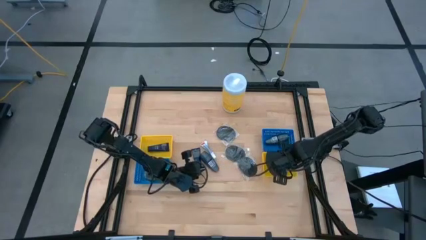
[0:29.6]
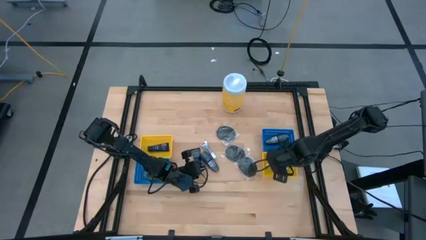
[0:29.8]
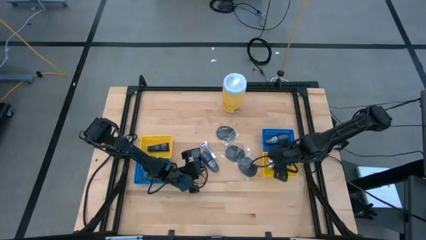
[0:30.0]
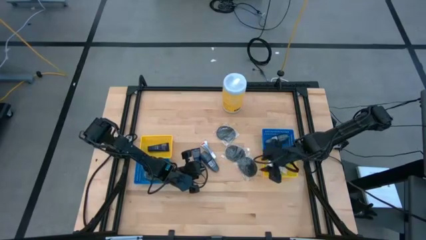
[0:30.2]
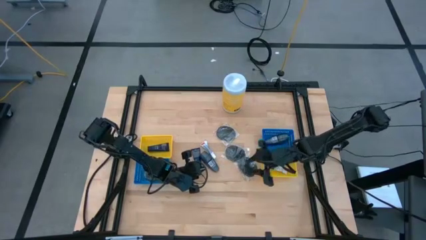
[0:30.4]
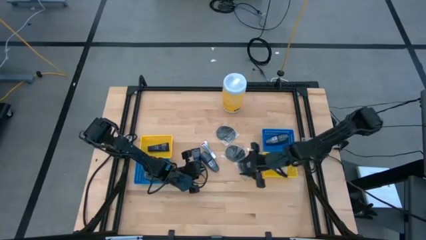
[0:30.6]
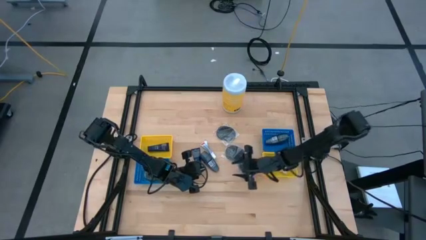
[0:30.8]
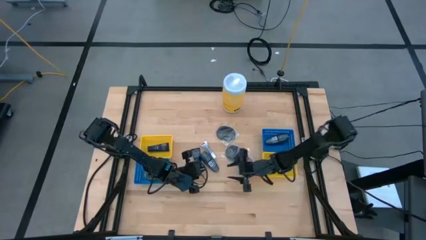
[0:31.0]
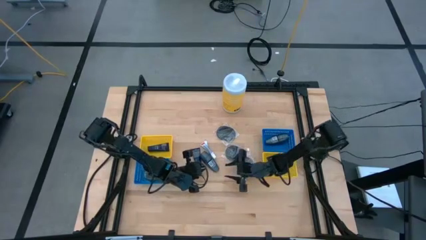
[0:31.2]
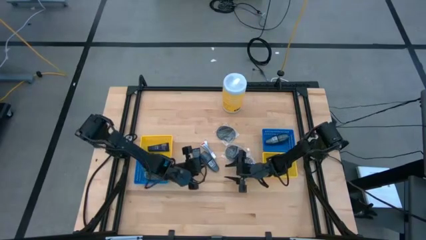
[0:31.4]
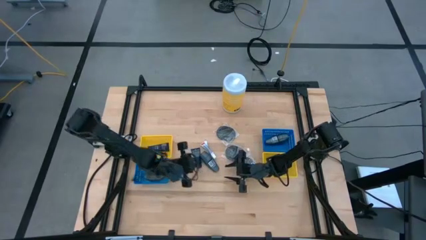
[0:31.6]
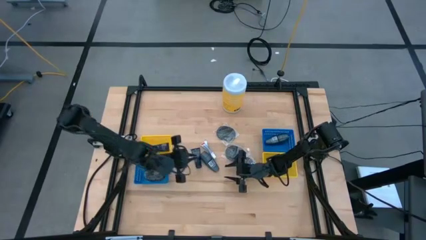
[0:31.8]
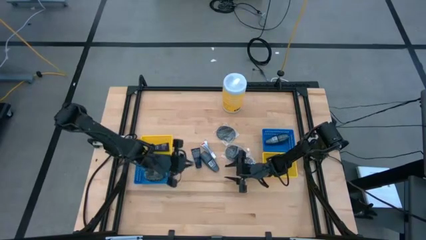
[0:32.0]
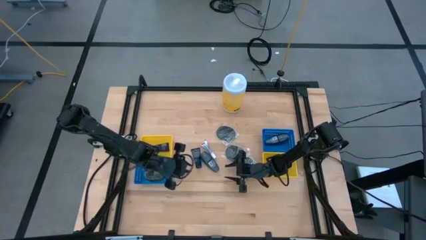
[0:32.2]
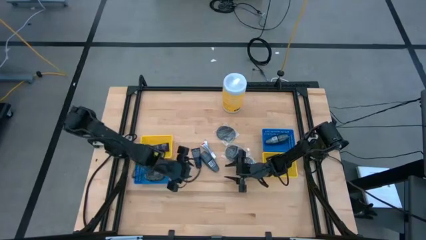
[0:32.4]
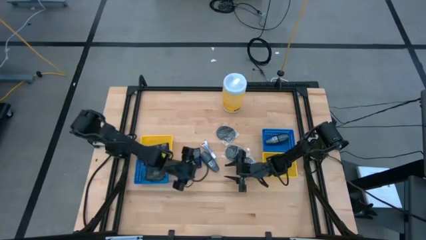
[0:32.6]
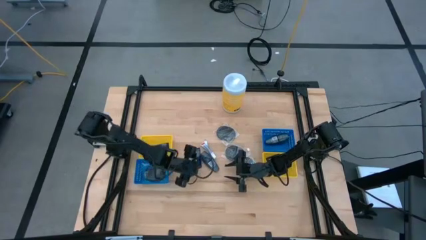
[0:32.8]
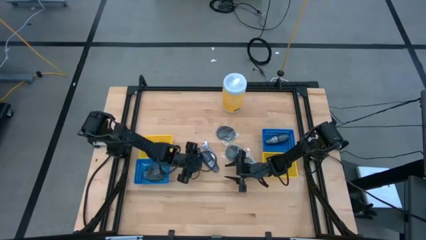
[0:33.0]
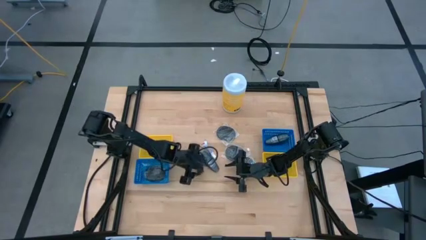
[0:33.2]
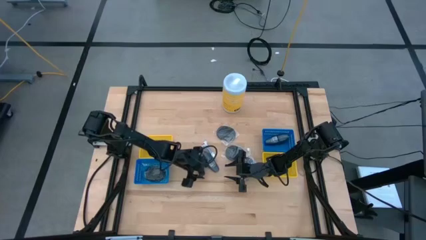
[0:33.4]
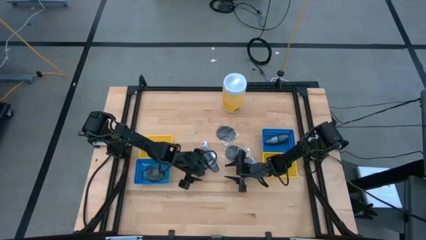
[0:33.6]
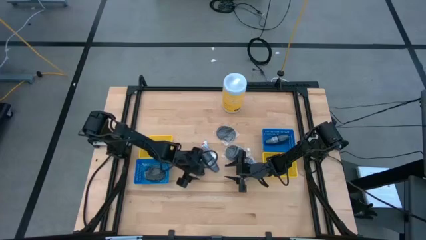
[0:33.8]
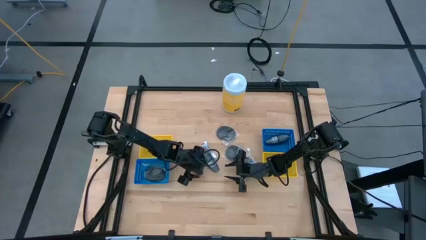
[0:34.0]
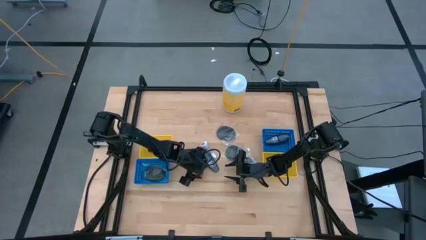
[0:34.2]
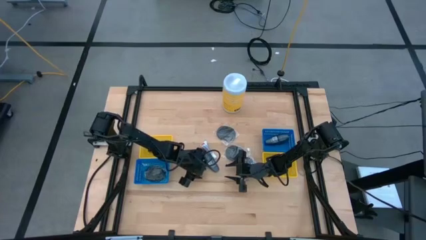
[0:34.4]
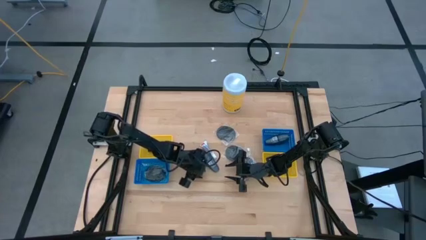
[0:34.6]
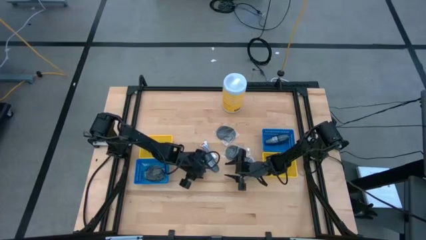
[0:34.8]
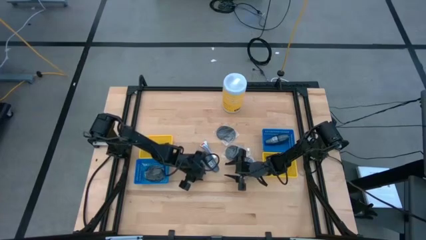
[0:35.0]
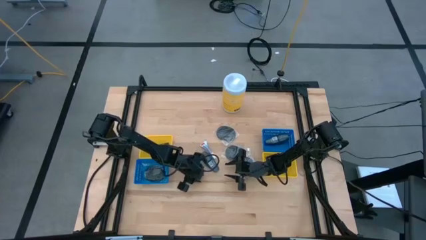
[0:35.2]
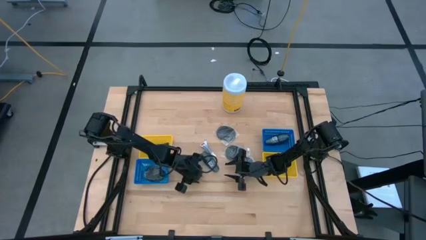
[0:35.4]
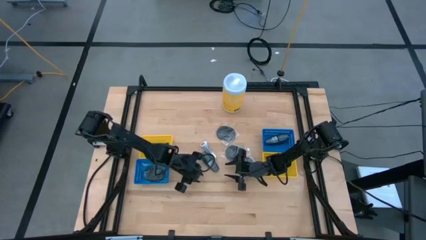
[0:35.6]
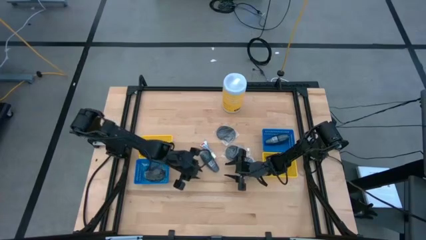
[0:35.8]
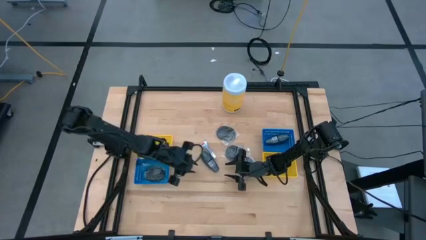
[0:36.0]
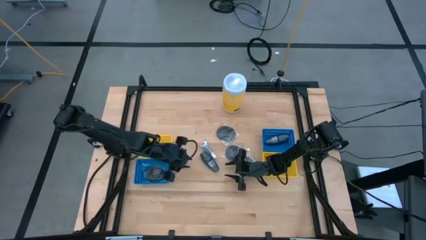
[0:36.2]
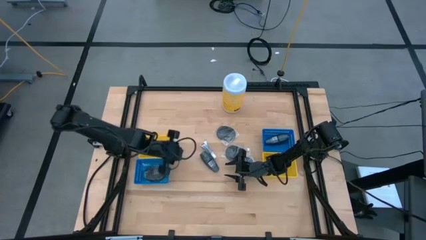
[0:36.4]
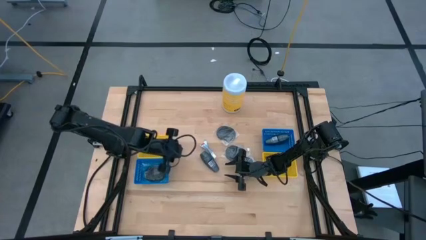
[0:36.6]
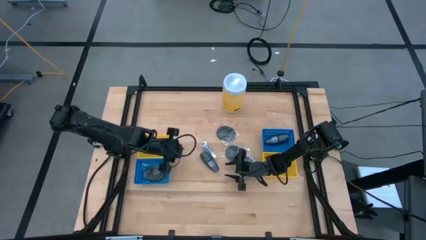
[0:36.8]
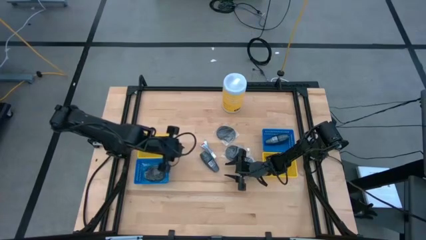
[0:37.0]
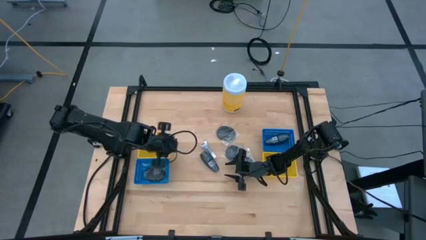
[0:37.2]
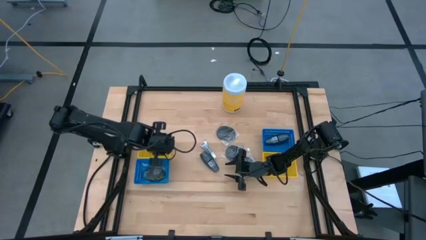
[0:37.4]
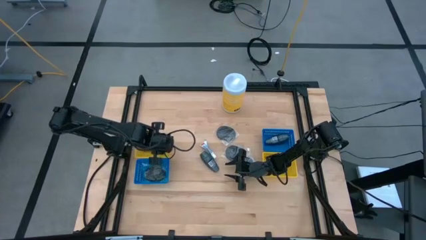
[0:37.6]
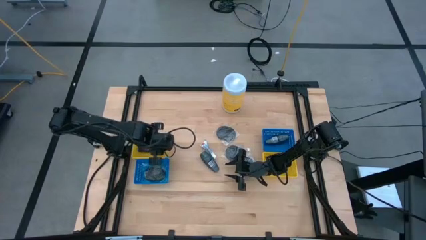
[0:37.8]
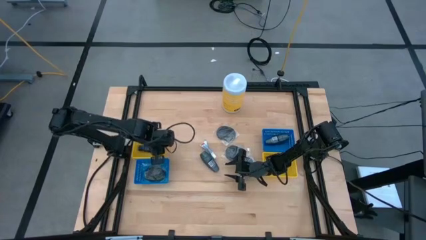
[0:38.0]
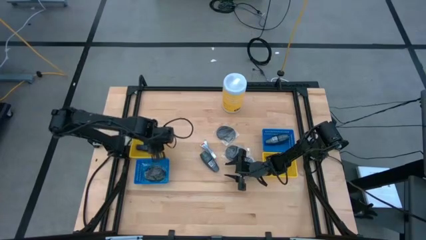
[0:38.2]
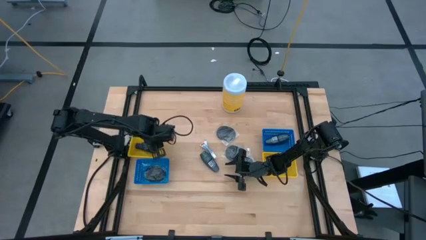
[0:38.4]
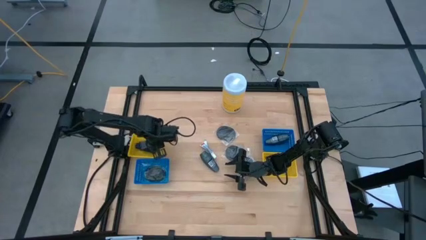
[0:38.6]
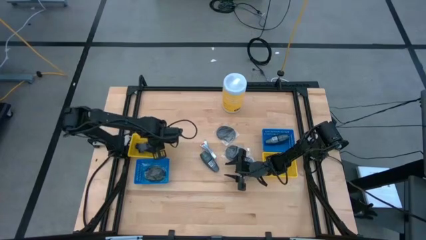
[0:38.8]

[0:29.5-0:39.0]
Task: Pick & Place Travel size toiletries
Put the blue shave cream into the left yellow bin

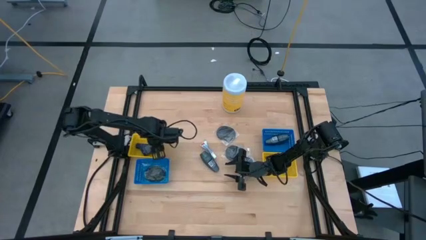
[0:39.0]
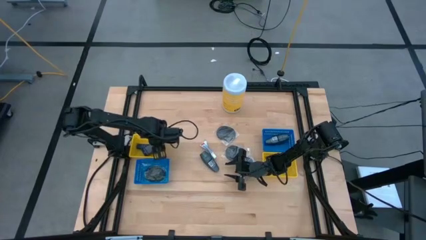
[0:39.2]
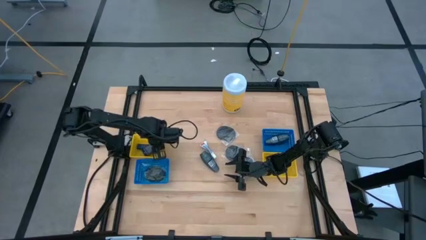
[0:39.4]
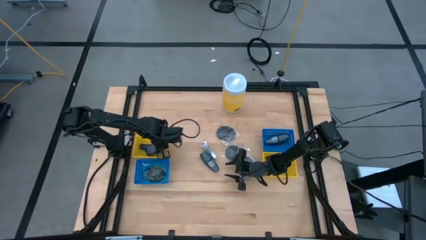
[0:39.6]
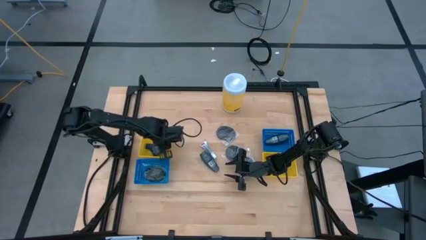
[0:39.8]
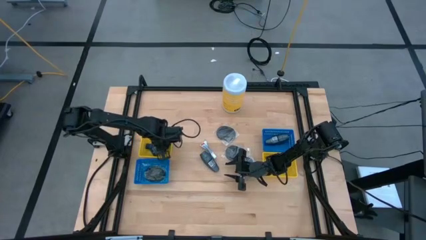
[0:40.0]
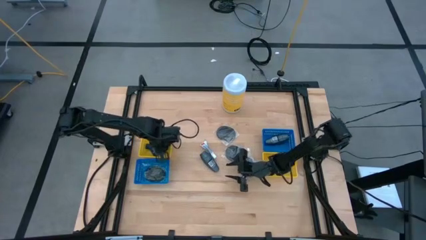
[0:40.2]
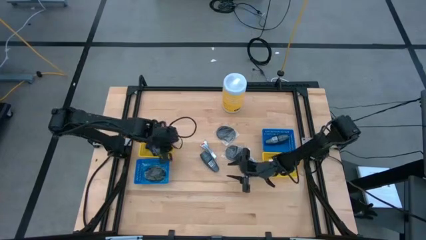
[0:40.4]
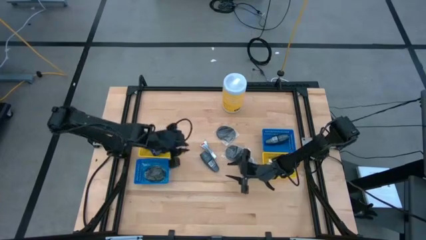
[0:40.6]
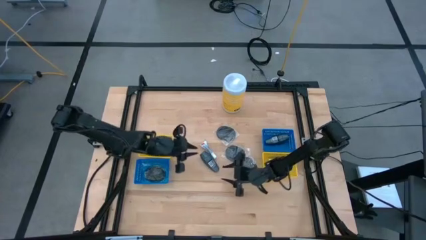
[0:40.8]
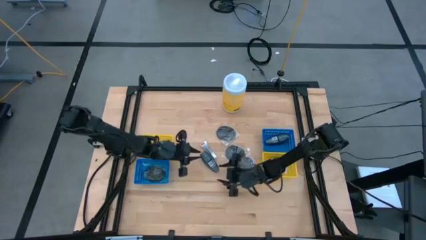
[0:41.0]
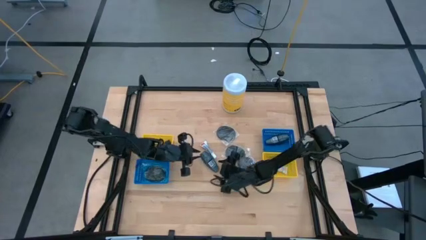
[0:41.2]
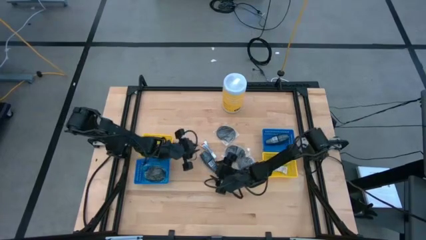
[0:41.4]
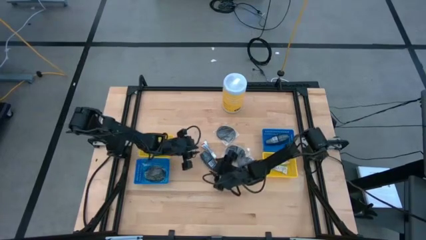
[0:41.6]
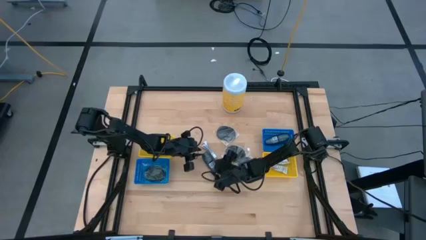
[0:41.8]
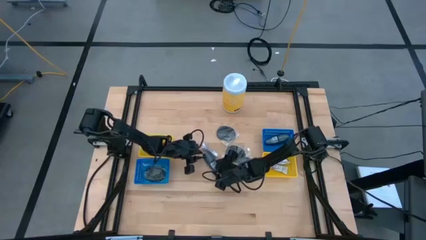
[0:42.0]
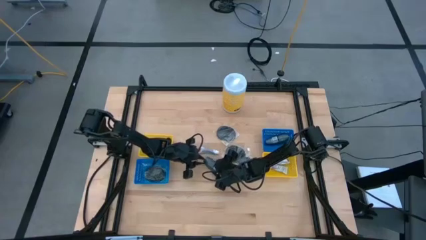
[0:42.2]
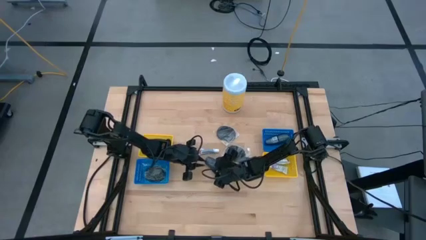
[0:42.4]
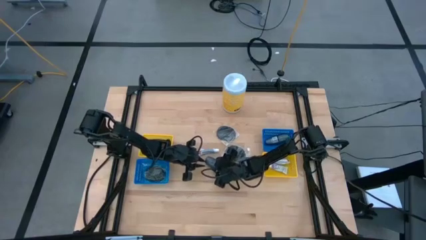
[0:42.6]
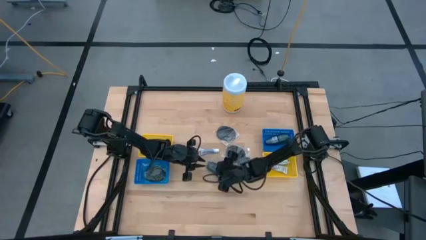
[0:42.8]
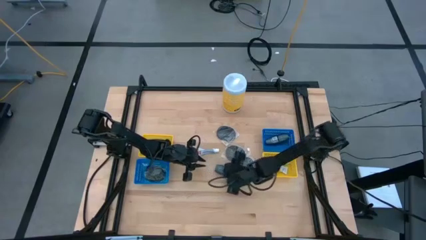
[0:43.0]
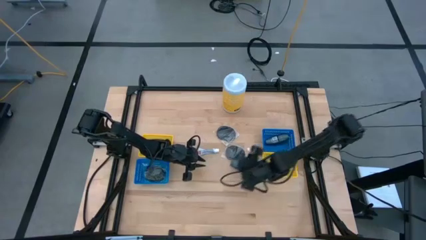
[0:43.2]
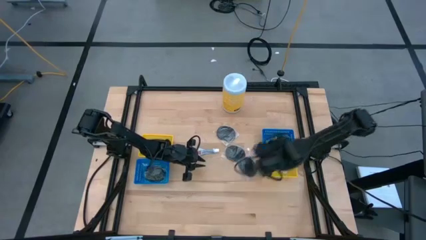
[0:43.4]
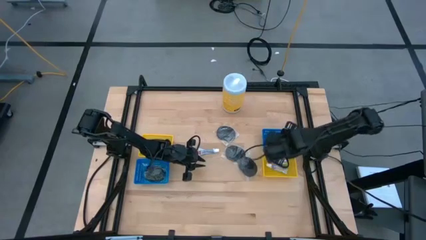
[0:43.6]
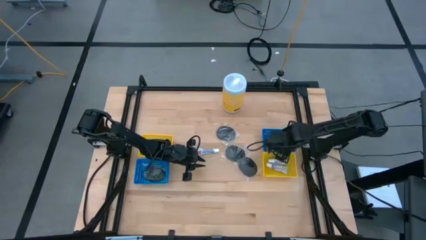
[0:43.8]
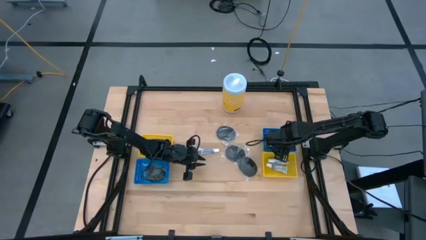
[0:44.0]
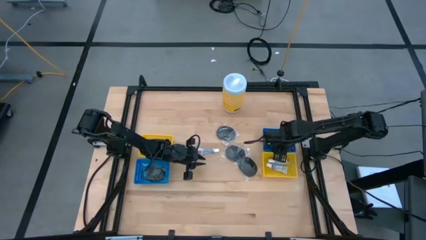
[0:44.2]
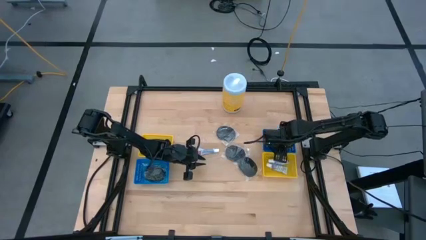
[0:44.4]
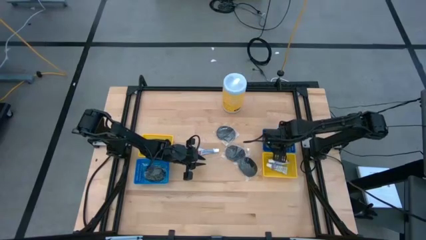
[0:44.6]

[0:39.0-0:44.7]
Put the black deodorant into the right blue bin

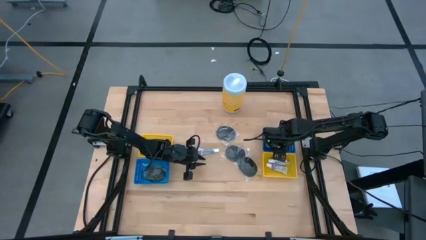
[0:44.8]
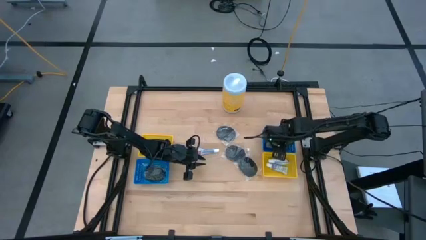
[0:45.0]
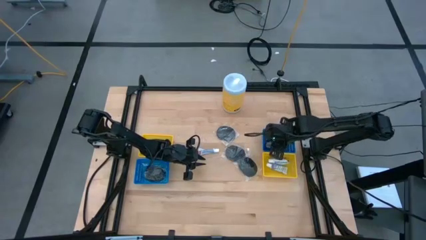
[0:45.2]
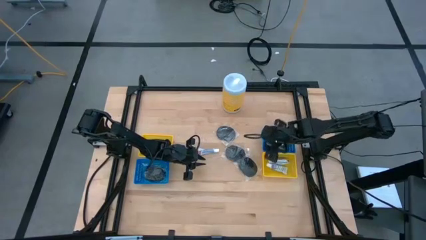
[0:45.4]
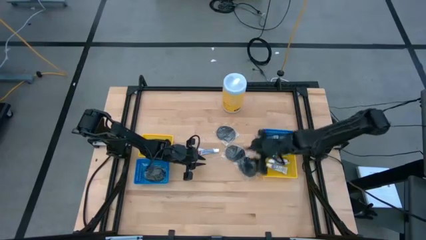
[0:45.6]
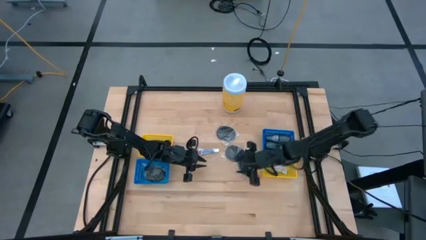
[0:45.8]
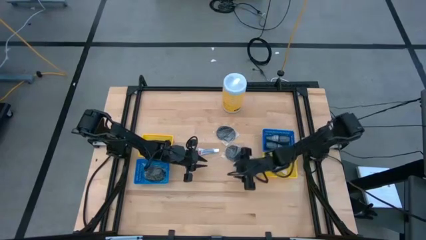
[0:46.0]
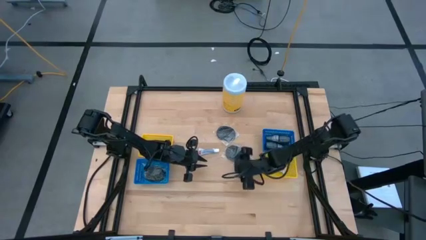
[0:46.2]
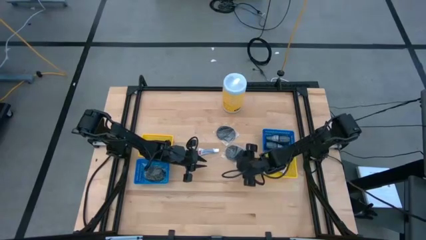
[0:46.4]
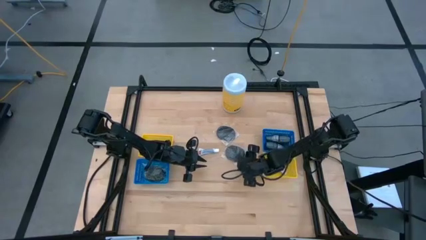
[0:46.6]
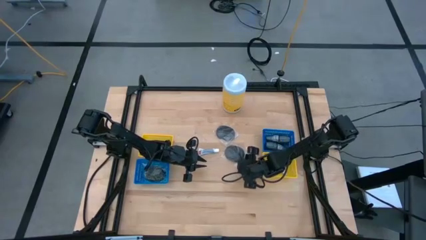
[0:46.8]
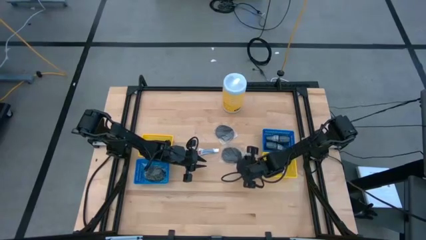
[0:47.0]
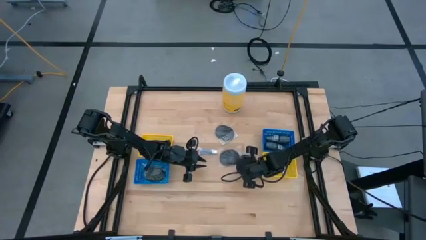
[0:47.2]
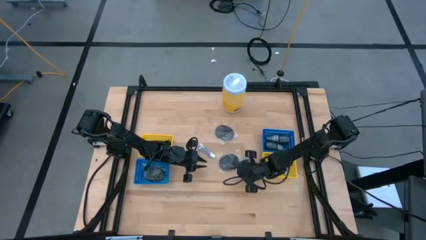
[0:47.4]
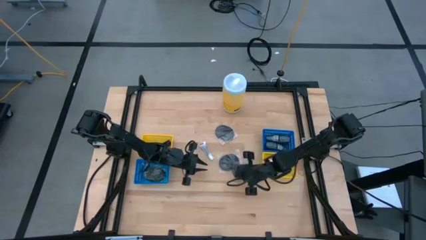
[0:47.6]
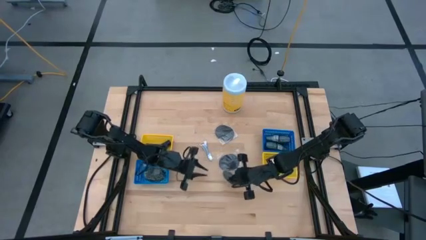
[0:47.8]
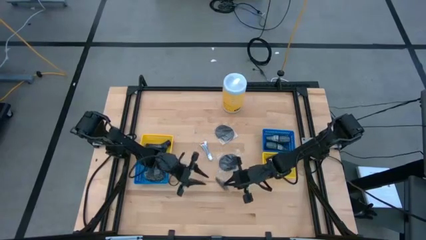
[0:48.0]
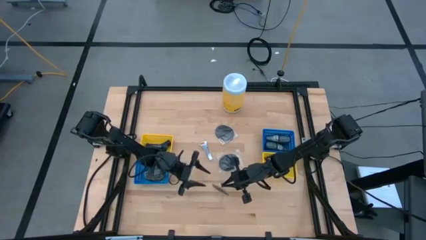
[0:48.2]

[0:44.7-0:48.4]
Put the black hairbrush into the left blue bin
